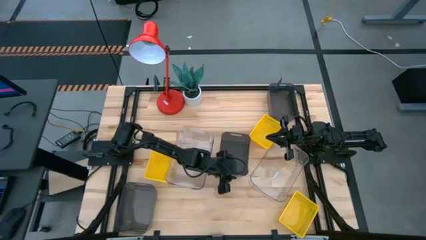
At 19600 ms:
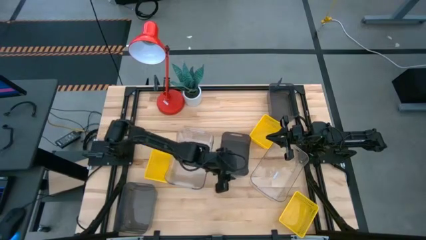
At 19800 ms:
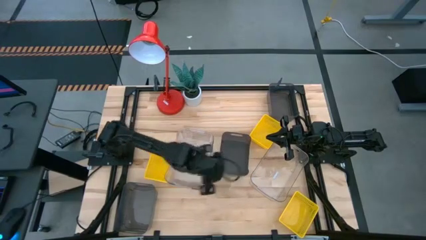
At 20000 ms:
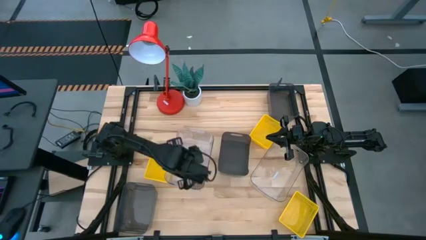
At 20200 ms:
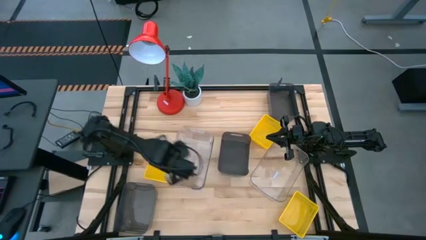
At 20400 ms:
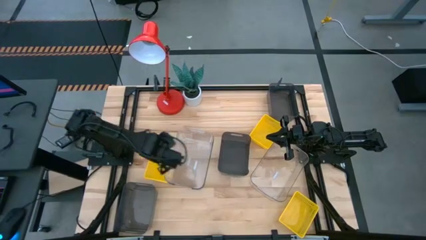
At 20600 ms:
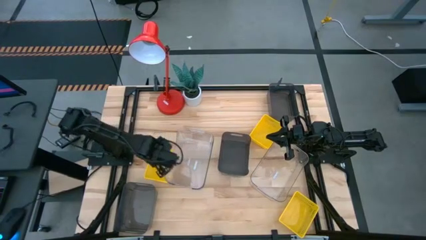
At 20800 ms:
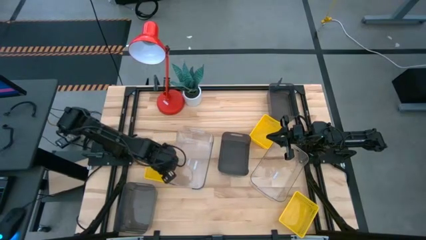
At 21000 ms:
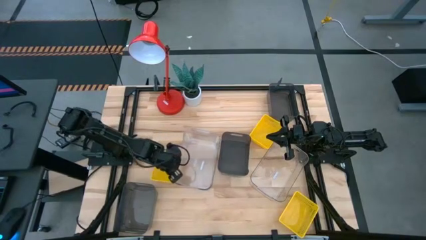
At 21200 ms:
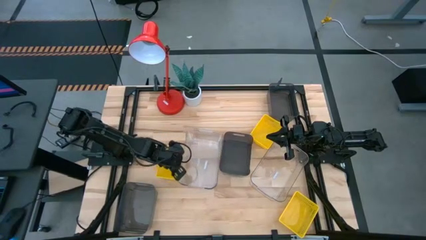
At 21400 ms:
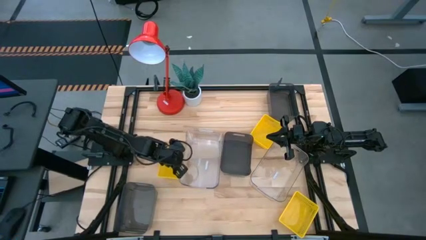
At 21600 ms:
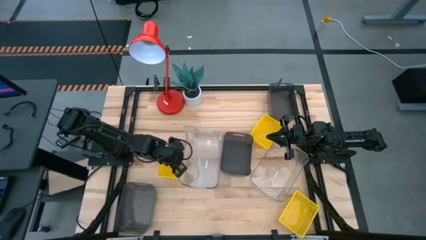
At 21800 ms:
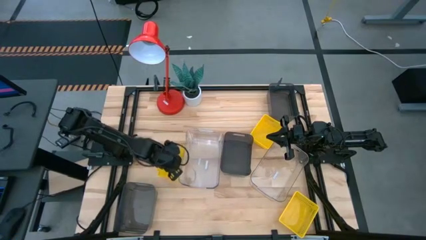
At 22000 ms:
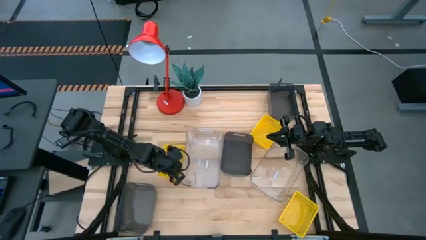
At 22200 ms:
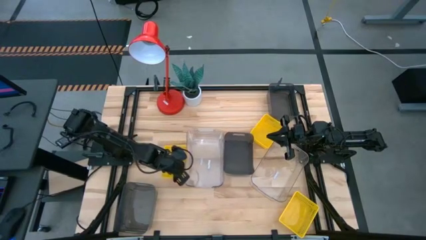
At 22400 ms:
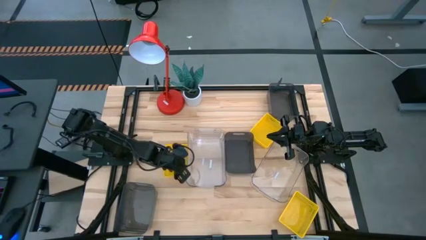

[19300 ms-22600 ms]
Adjust the middle left yellow bin on the table

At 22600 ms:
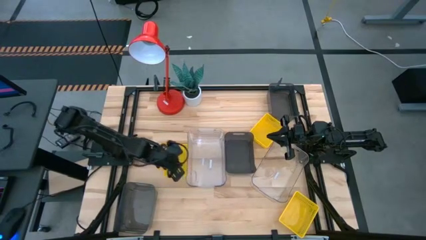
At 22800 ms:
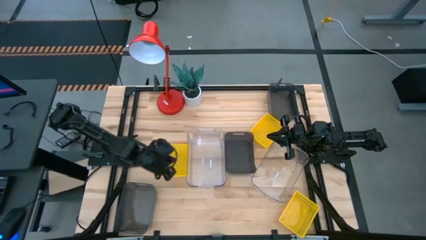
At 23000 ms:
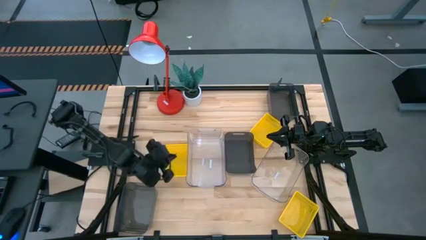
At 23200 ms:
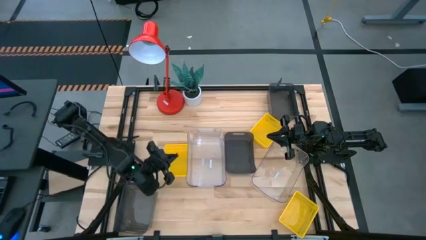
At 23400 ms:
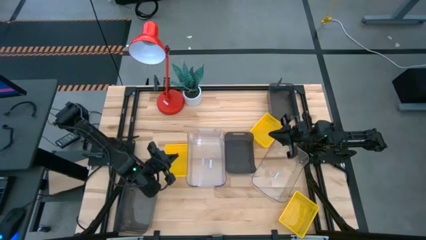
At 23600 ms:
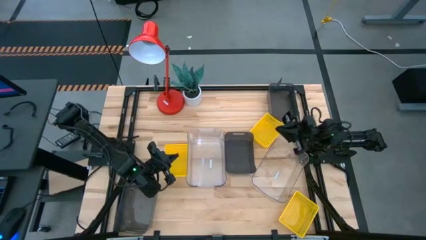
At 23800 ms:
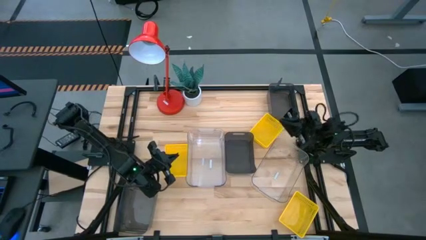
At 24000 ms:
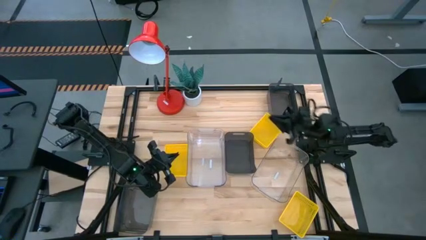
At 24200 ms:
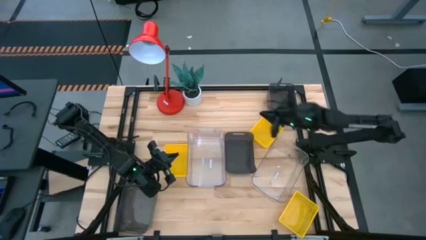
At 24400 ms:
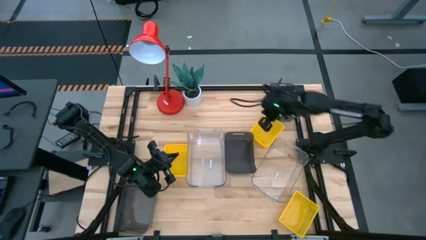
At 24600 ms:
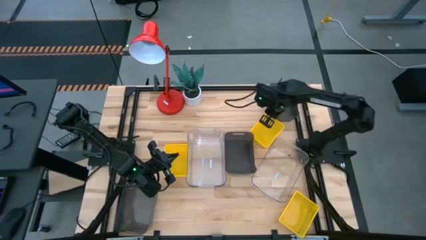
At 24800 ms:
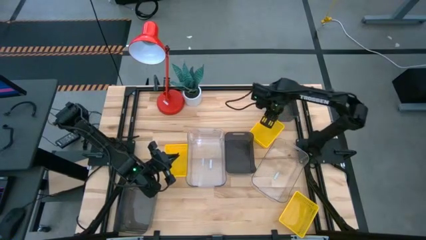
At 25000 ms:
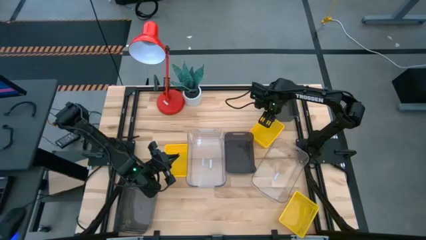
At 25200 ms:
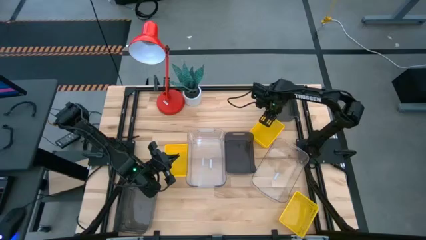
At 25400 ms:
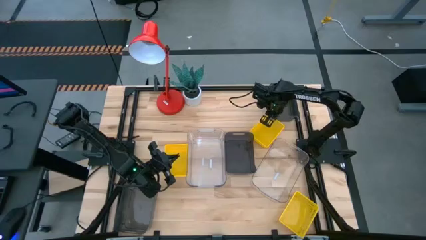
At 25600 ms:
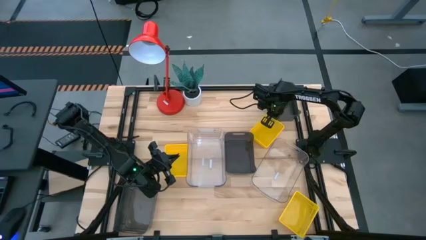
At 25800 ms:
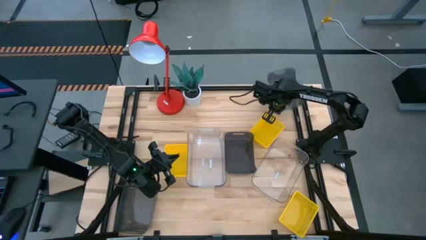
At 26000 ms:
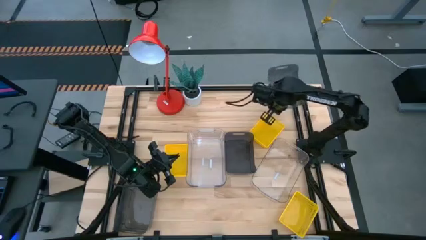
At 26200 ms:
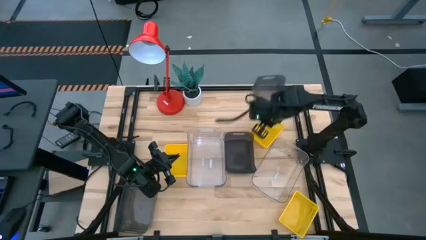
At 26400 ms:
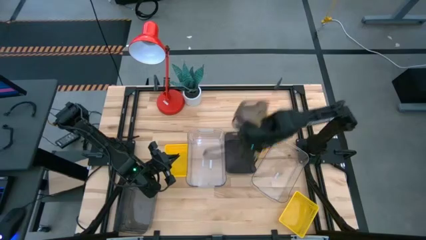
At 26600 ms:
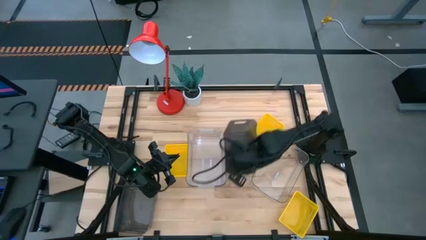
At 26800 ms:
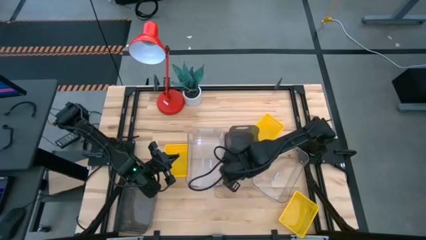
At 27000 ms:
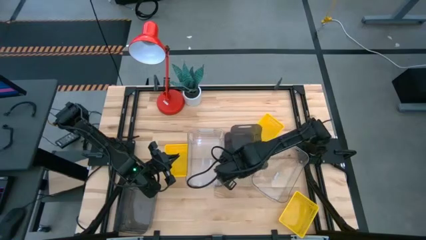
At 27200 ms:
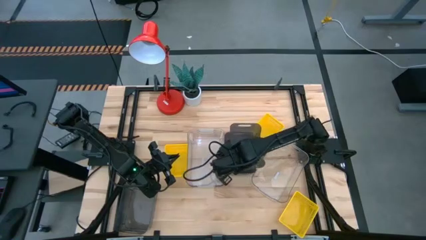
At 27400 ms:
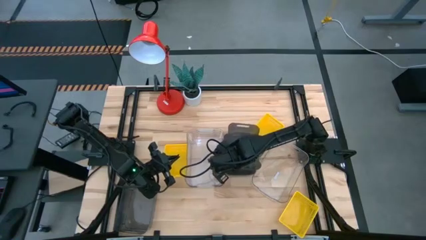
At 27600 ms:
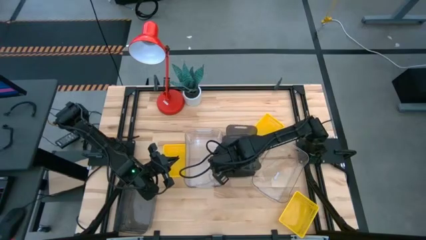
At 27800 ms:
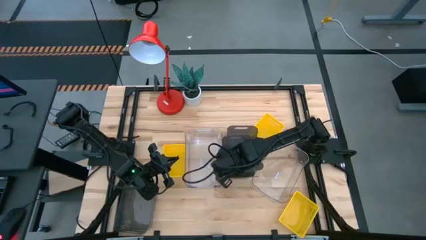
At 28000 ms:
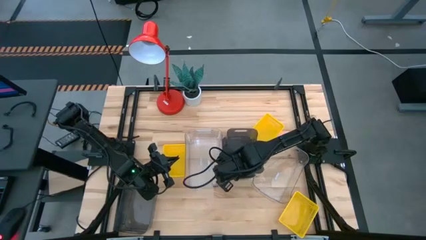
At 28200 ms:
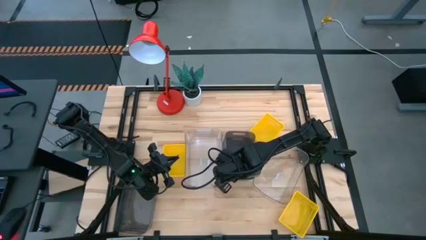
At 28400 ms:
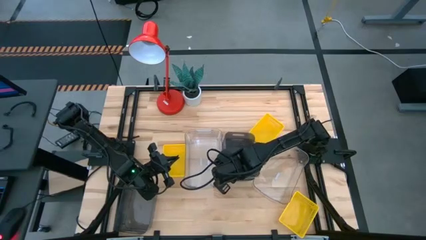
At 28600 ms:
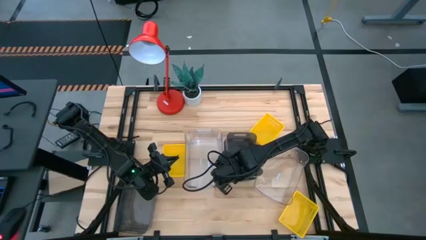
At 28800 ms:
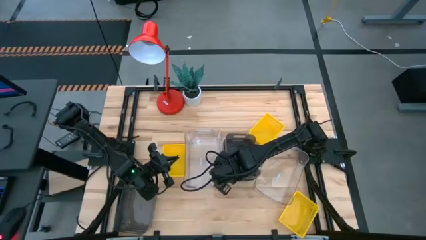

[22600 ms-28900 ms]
Stack the top black bin on the middle right black bin

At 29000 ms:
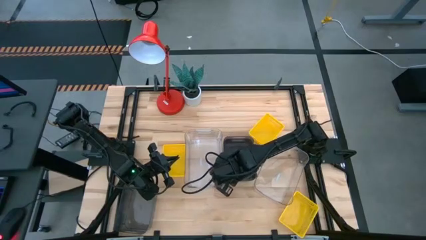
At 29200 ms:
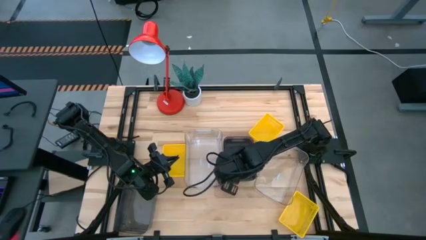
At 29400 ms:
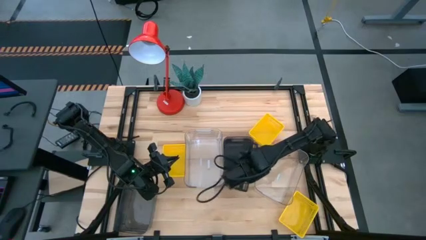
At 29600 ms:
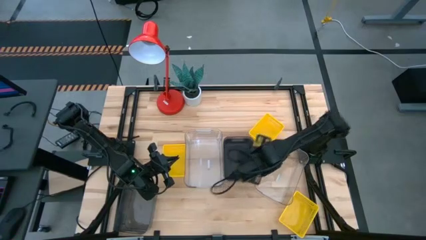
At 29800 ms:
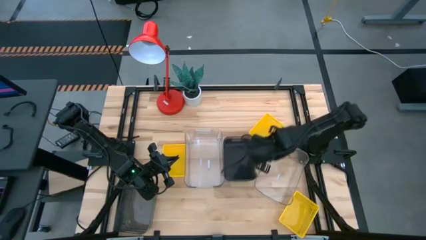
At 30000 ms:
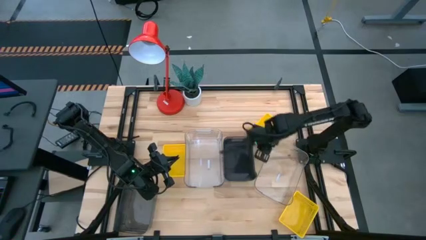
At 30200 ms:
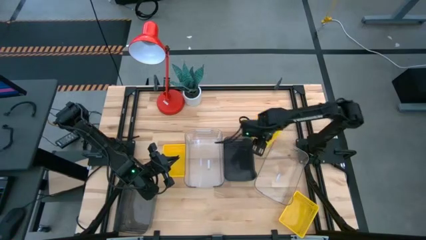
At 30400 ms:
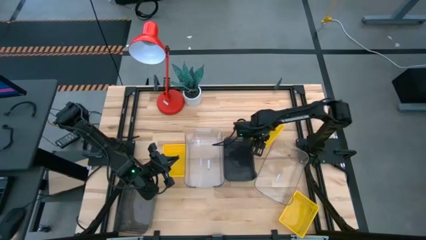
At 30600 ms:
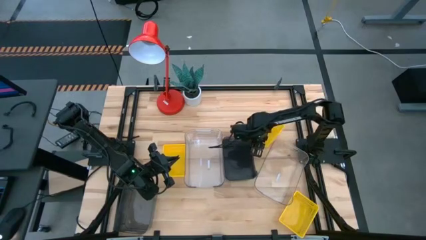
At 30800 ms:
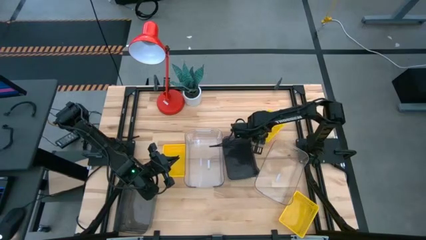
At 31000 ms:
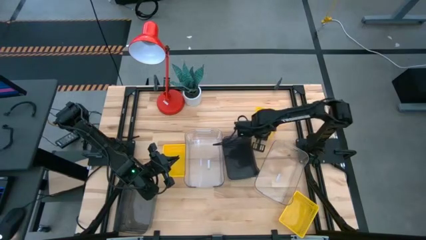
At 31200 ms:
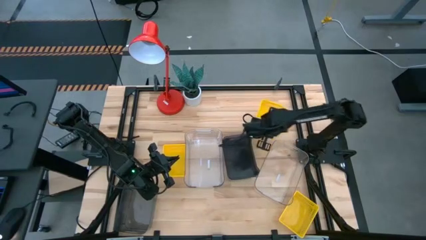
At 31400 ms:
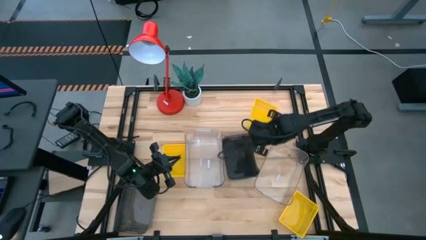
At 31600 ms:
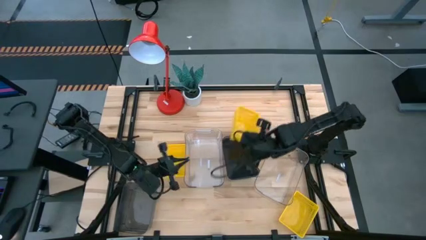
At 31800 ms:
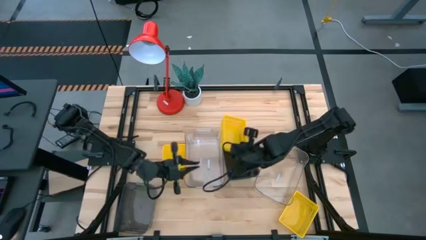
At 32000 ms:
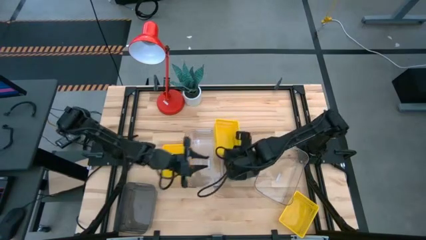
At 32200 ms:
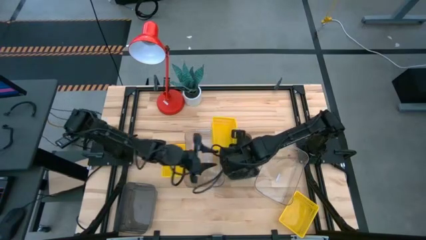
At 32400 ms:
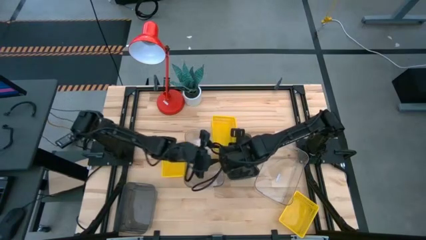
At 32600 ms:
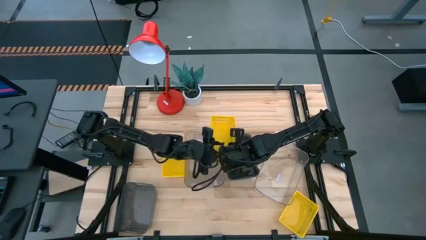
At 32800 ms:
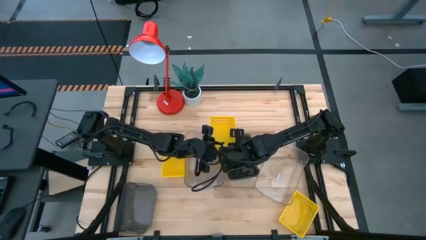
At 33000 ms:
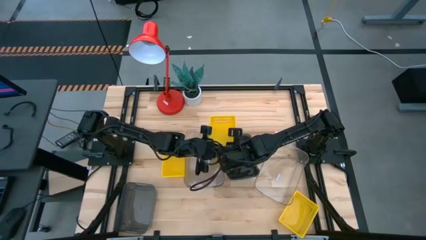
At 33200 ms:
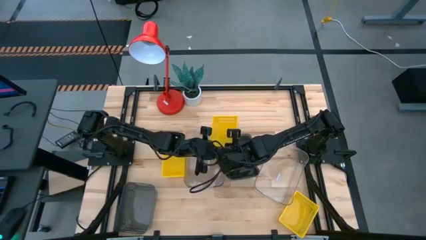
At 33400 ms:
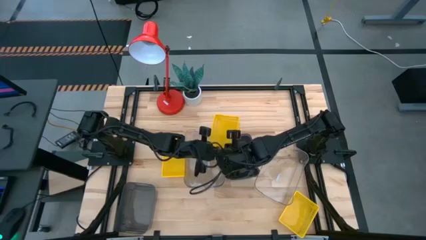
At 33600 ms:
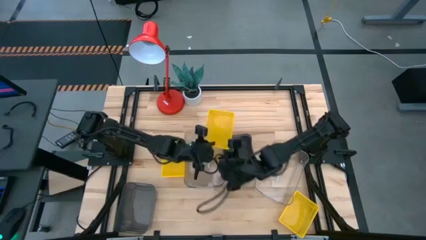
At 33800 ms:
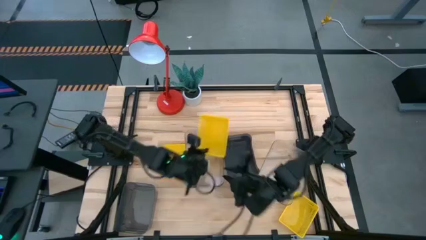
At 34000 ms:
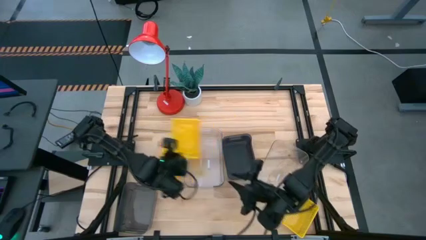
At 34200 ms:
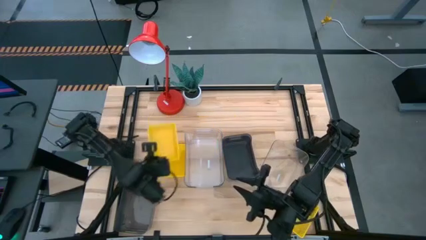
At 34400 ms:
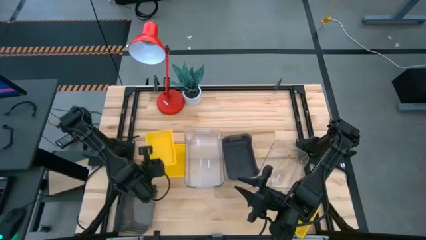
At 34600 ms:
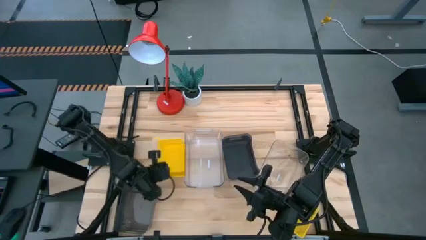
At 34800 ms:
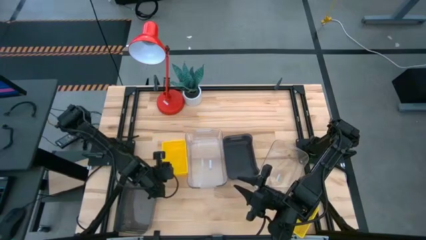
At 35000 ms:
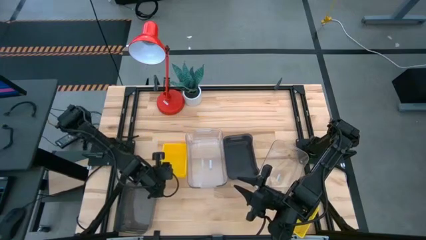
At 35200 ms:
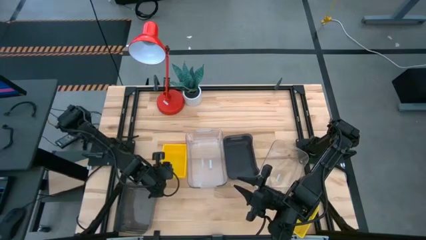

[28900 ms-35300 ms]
Stack the top right yellow bin on the middle left yellow bin
